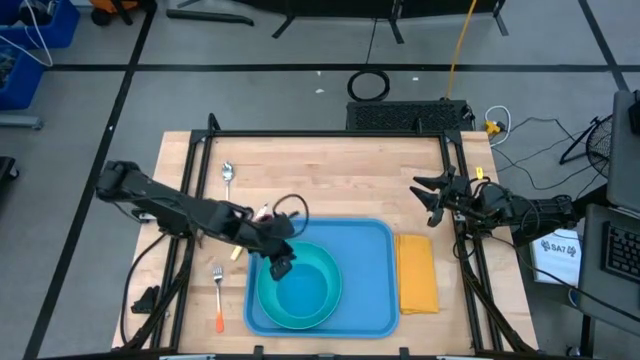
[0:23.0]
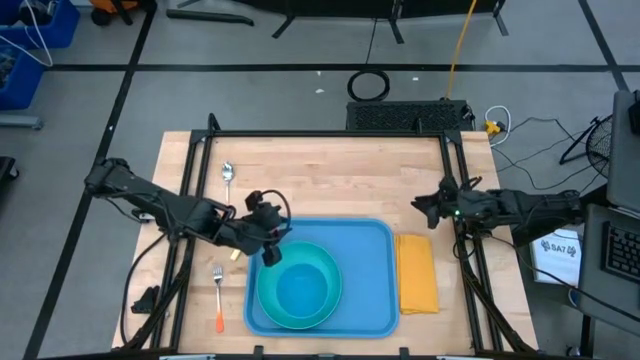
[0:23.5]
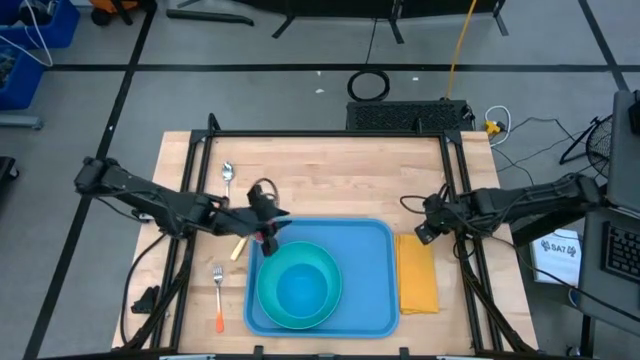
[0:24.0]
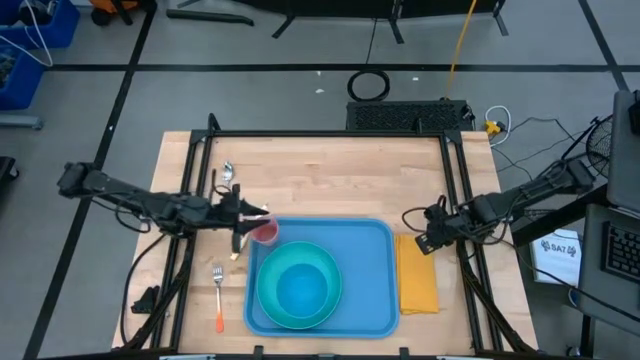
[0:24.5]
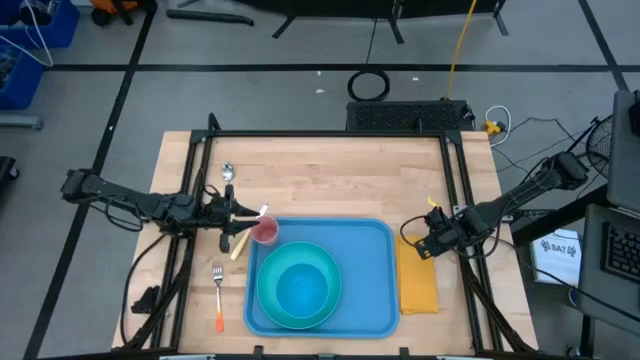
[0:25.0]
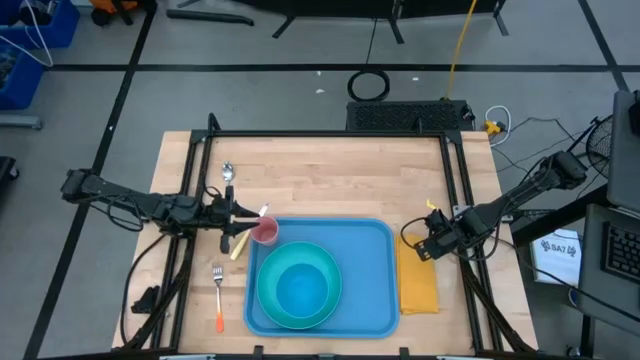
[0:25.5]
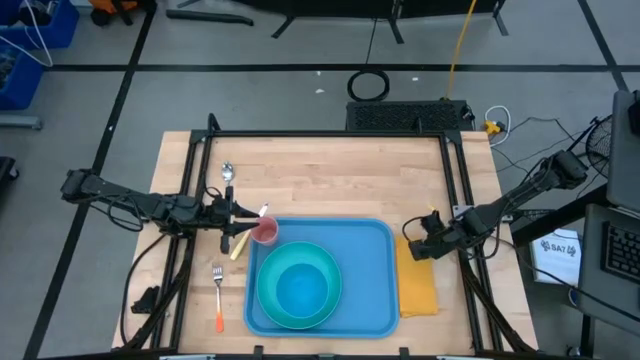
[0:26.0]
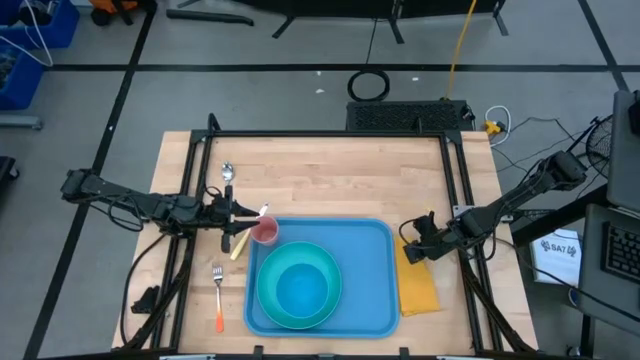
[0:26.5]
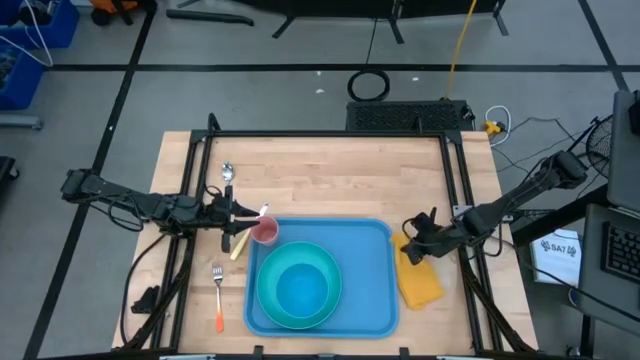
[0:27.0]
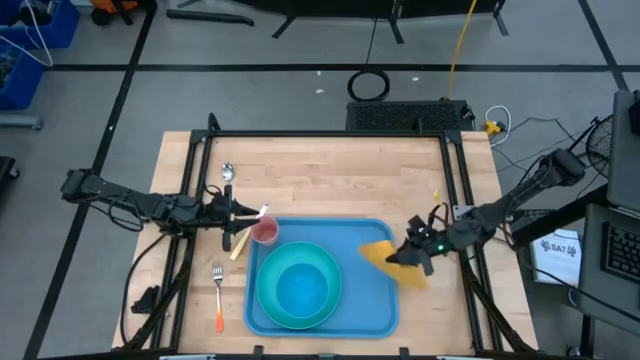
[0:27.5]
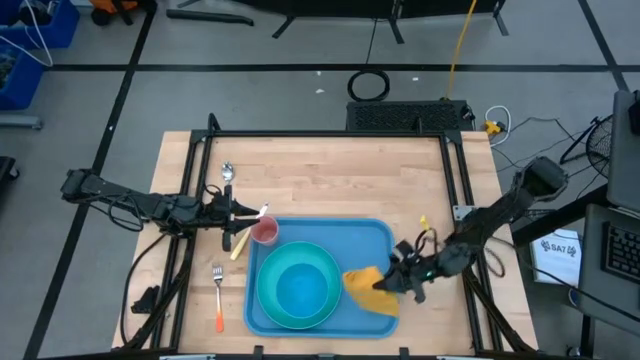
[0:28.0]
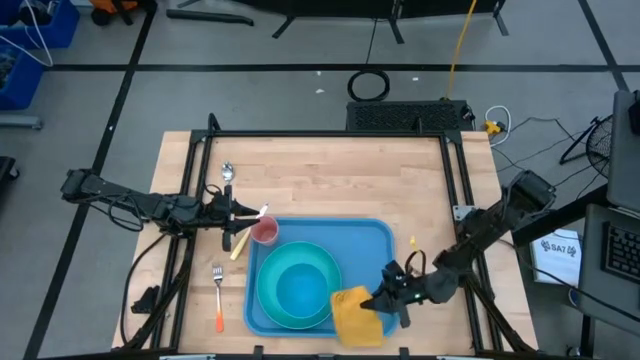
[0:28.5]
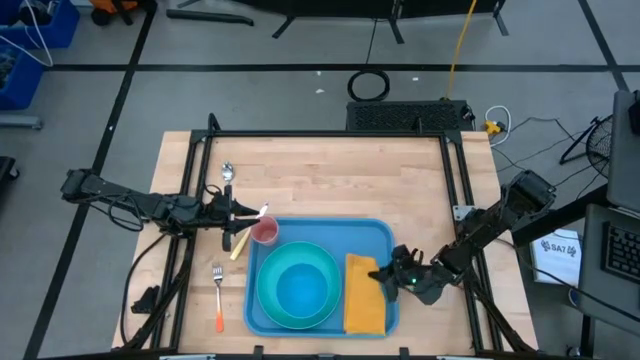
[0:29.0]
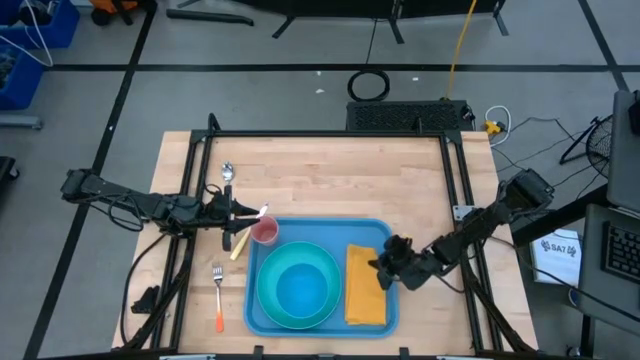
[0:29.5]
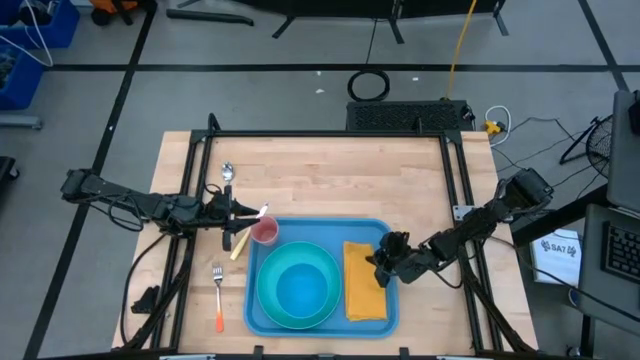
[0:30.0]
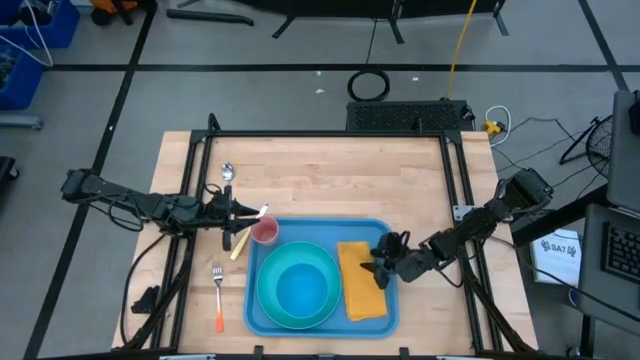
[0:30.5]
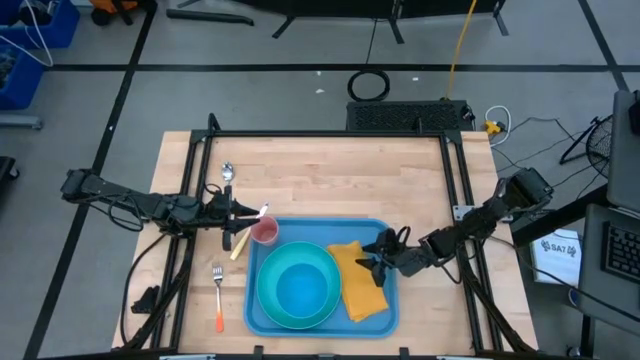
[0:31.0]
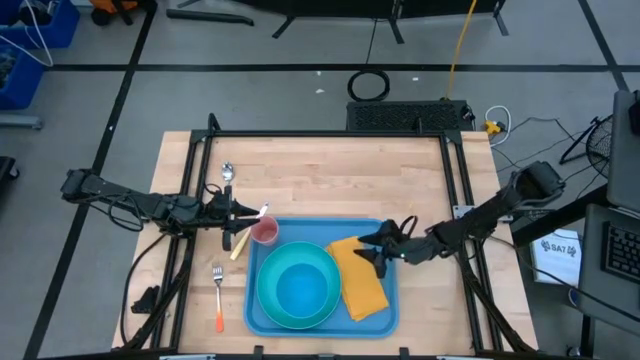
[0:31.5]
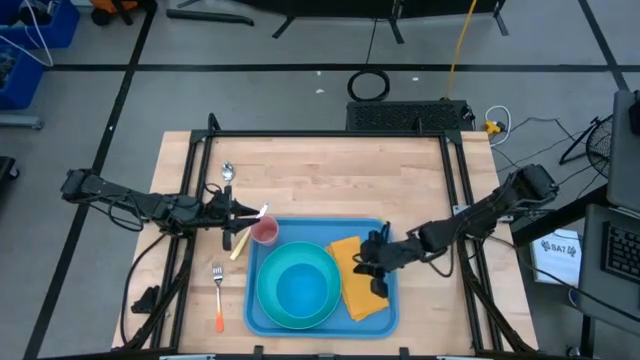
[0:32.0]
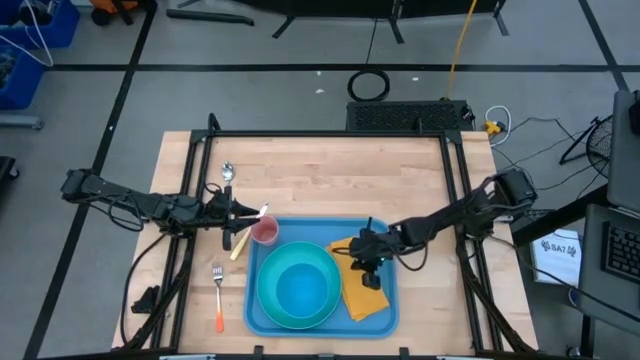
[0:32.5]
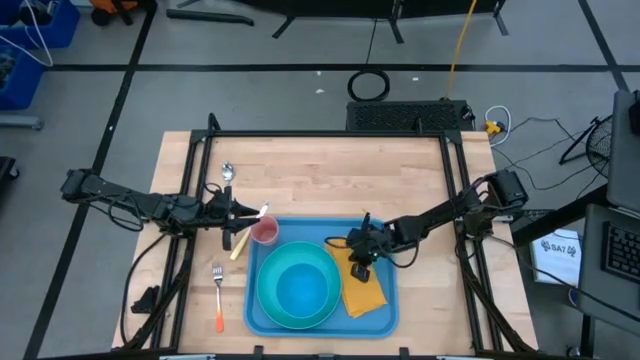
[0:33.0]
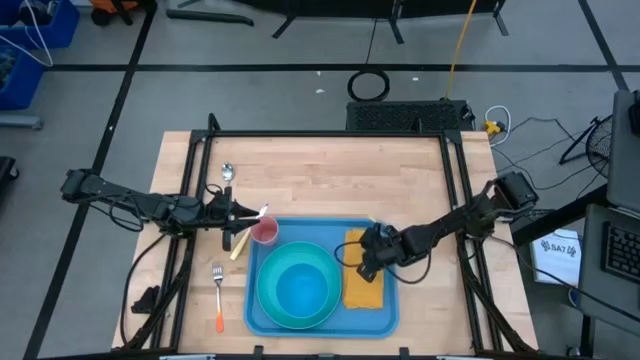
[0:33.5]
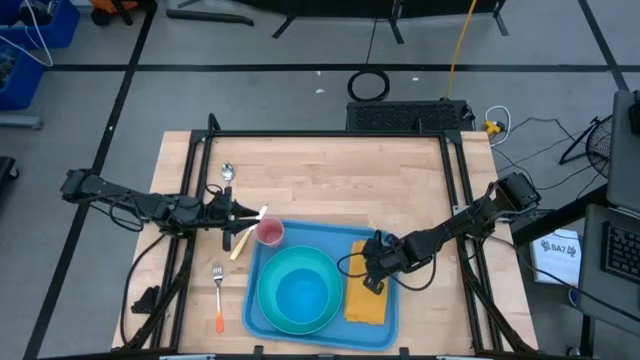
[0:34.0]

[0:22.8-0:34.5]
Task: Set up tray
Put the yellow napkin on the blue serving tray to the top right of the green plate

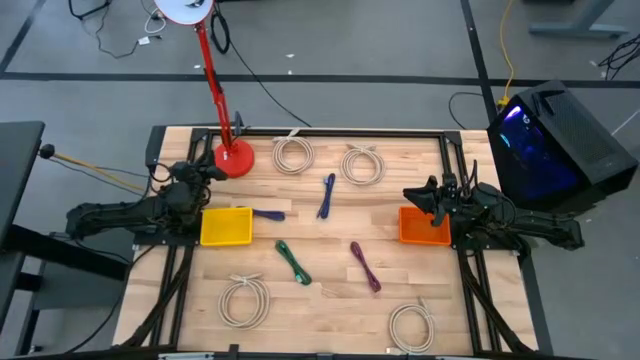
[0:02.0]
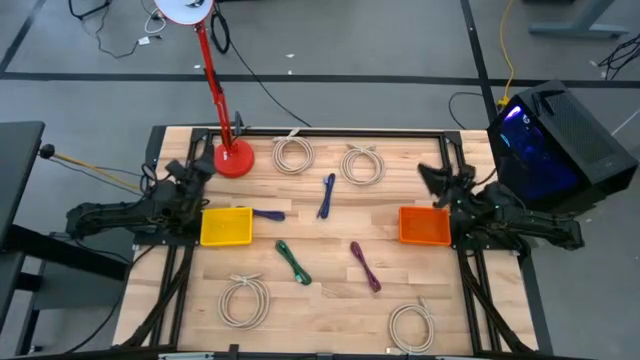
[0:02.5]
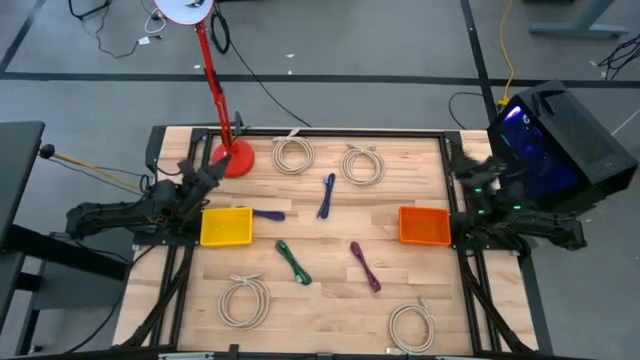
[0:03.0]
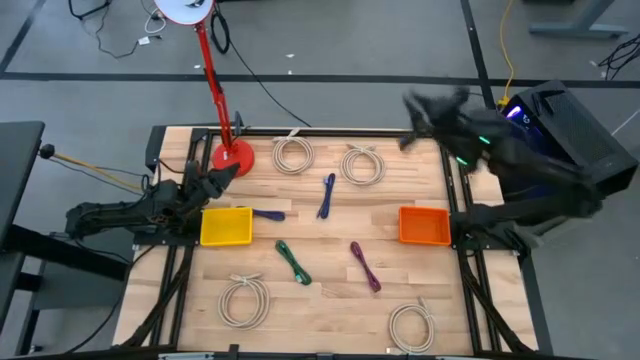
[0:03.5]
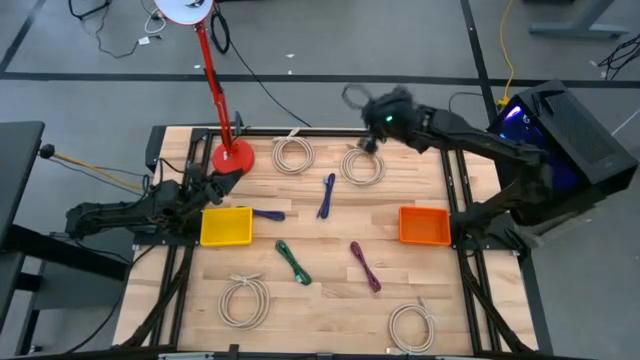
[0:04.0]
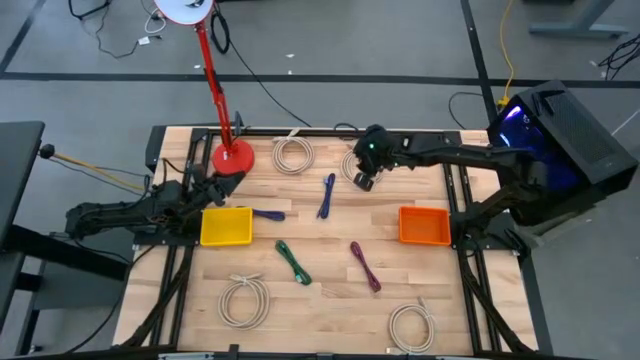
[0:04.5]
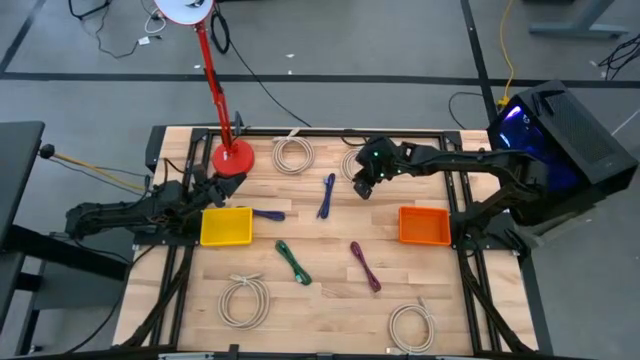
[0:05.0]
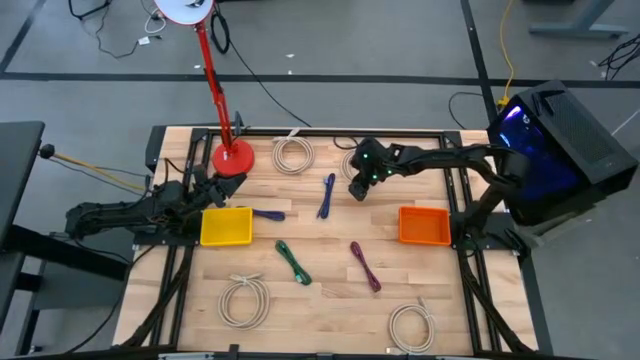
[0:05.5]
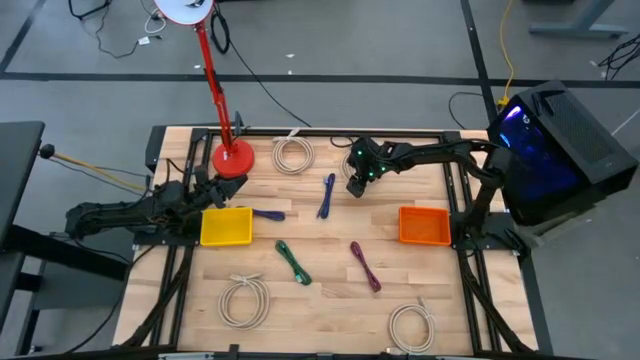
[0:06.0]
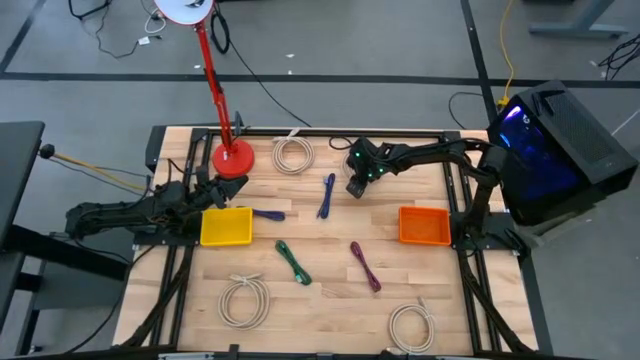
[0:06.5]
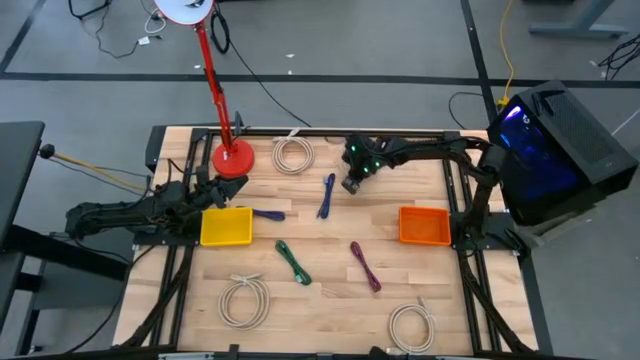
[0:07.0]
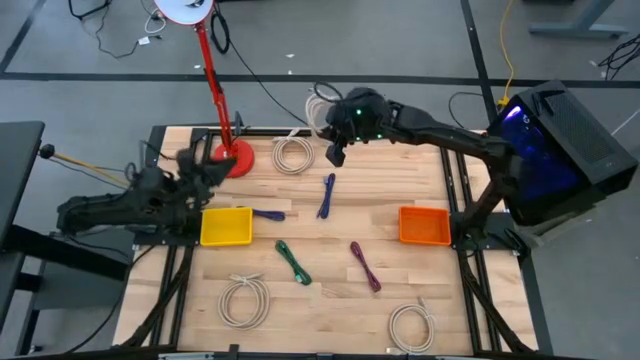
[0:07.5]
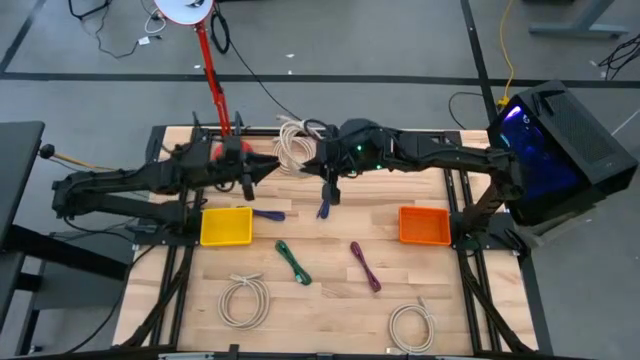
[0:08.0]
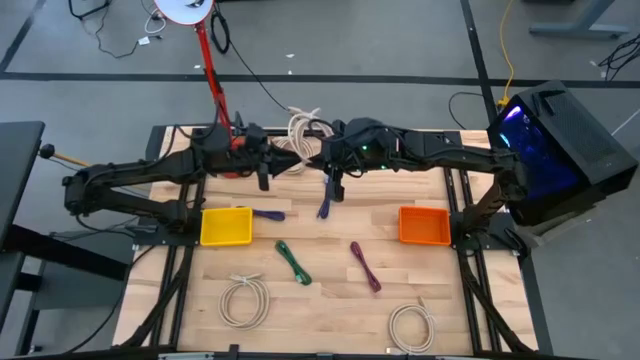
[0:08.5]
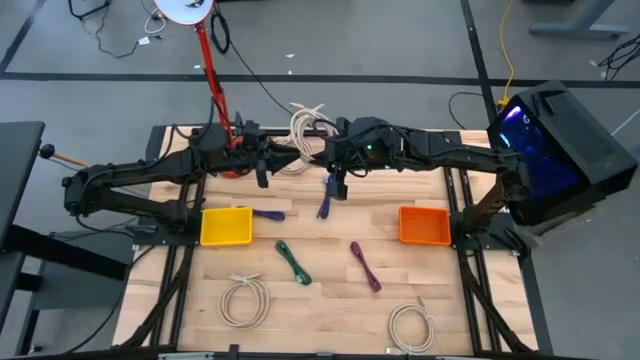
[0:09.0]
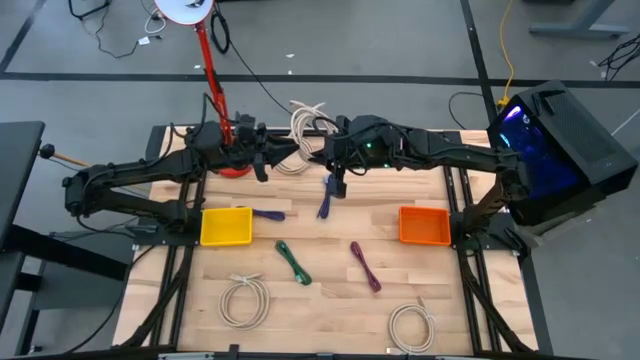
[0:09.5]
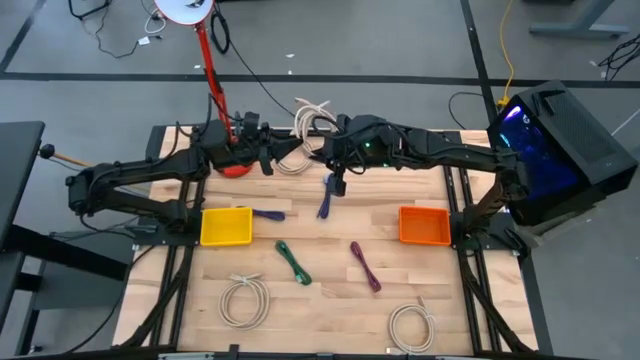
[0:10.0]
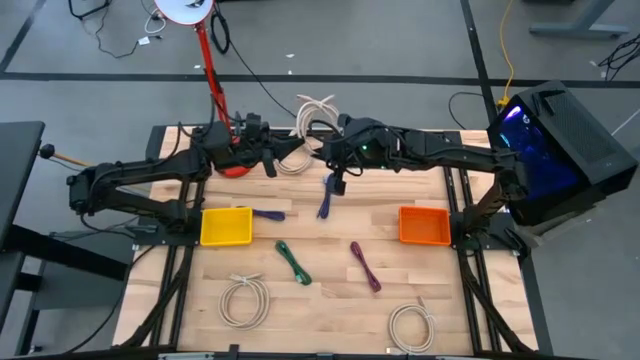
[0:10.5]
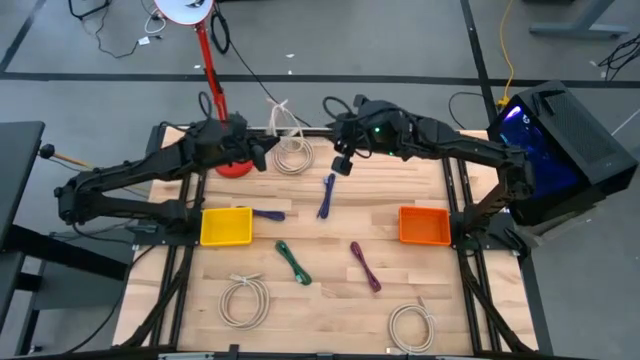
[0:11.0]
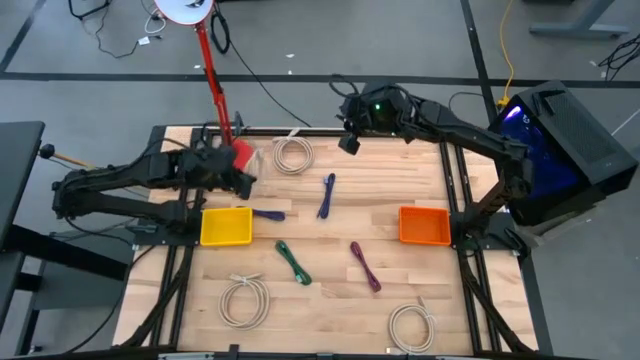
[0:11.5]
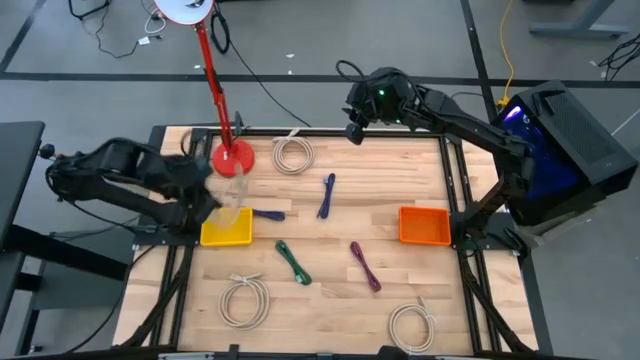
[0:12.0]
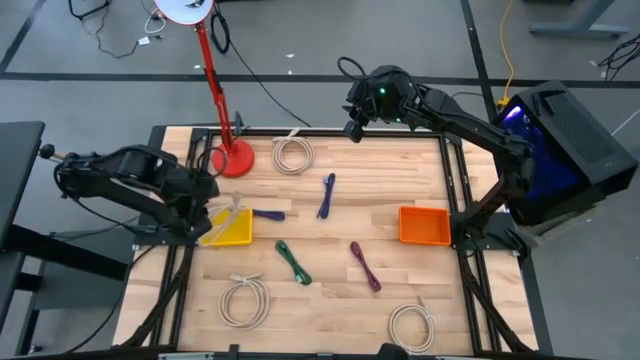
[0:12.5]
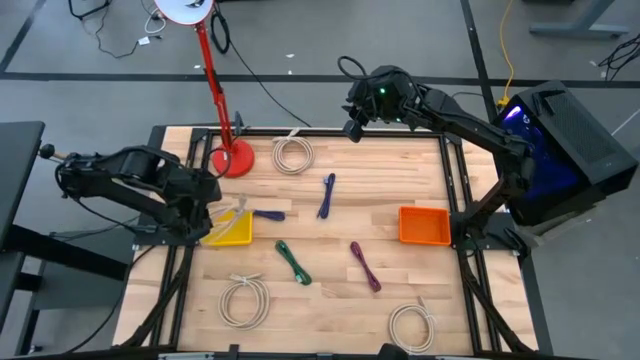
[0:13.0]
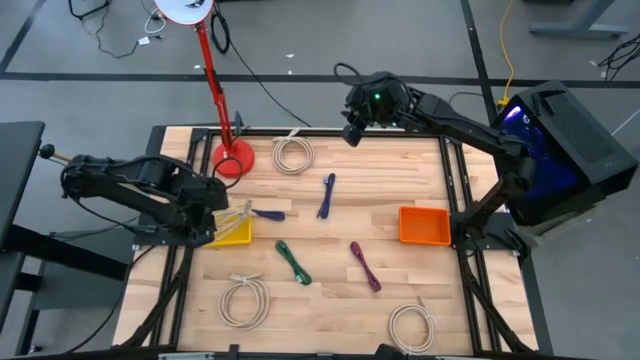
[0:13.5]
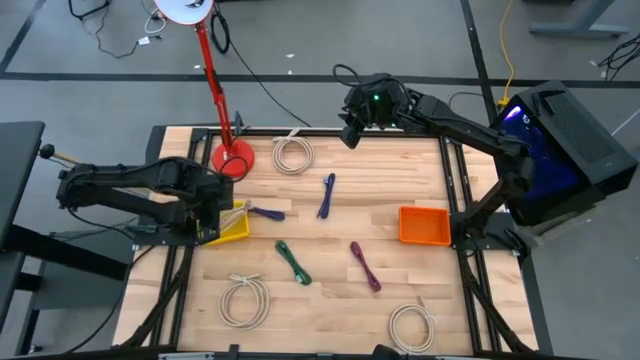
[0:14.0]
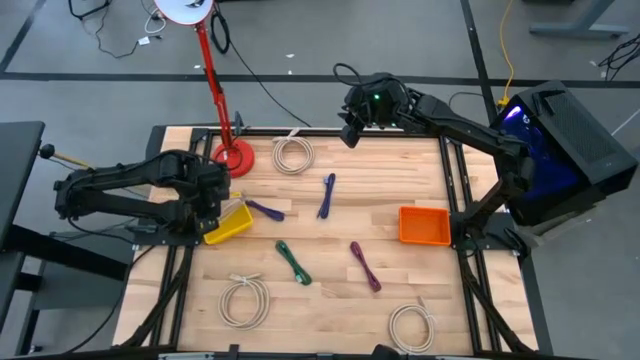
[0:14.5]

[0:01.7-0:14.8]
Task: Pick & Place USB Port
Put the light brown HDMI cable into the yellow bin
